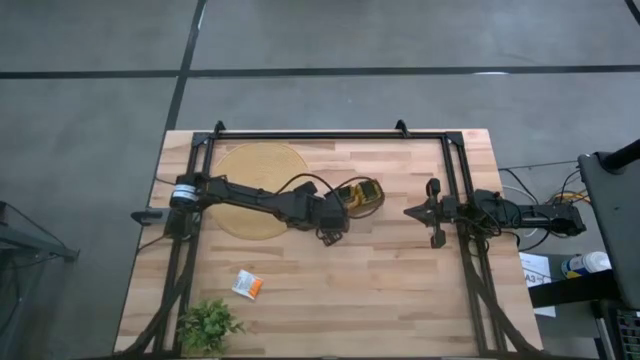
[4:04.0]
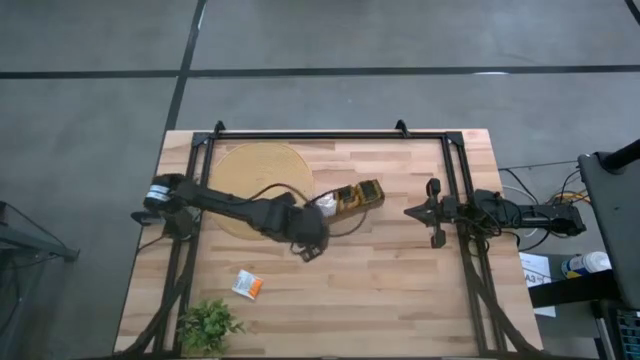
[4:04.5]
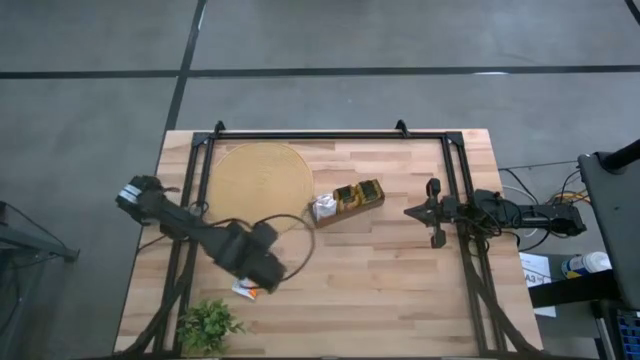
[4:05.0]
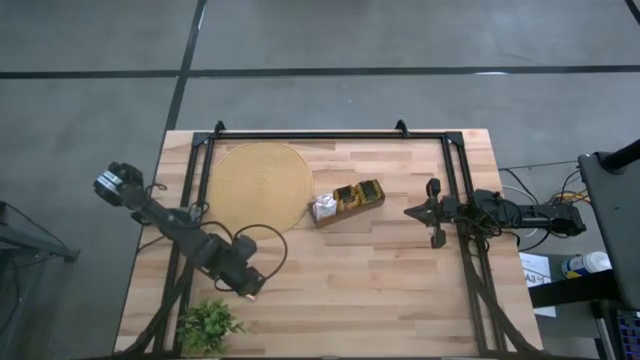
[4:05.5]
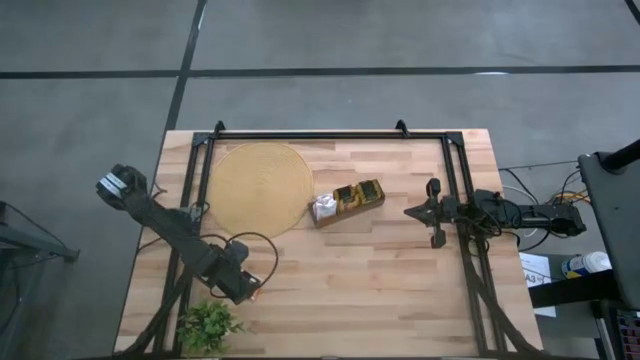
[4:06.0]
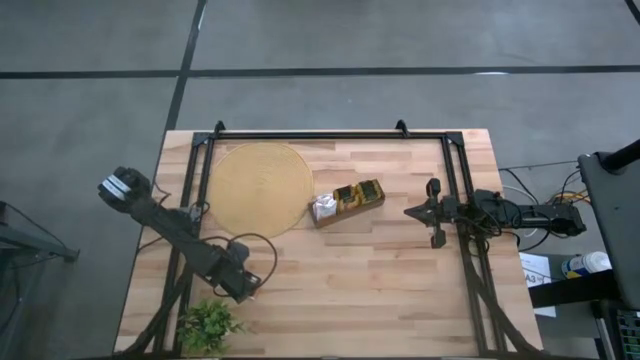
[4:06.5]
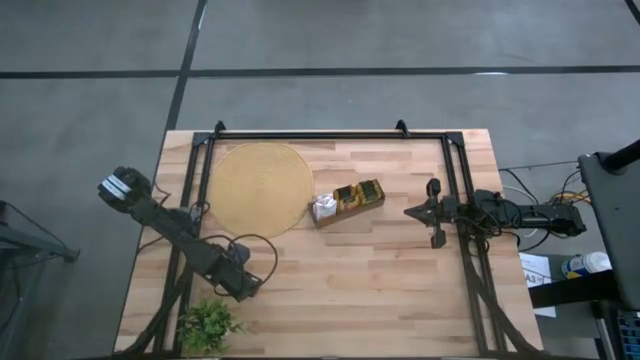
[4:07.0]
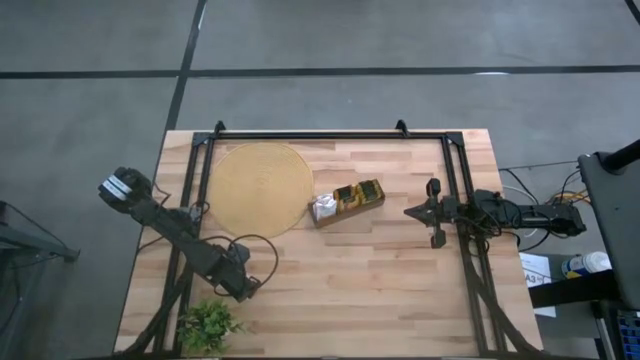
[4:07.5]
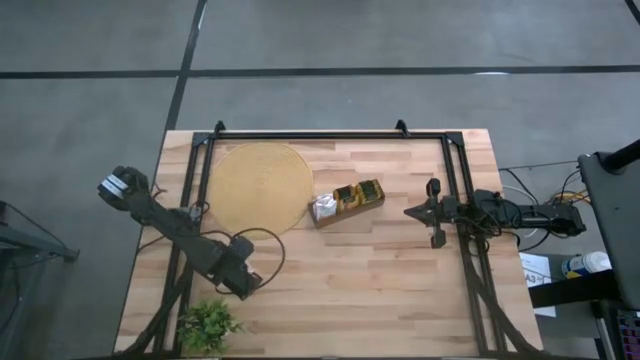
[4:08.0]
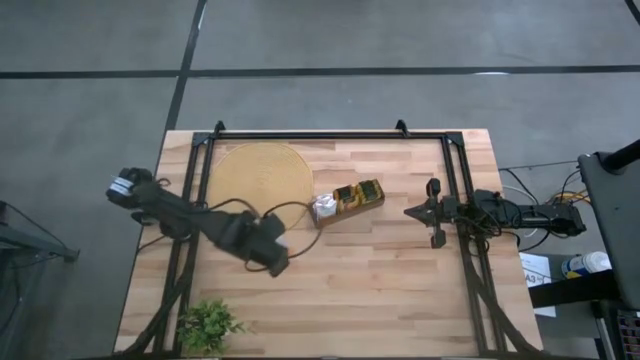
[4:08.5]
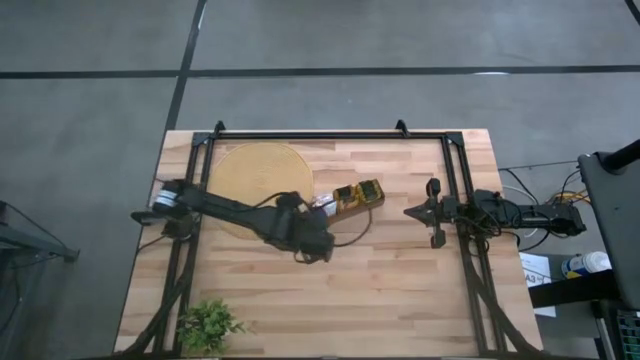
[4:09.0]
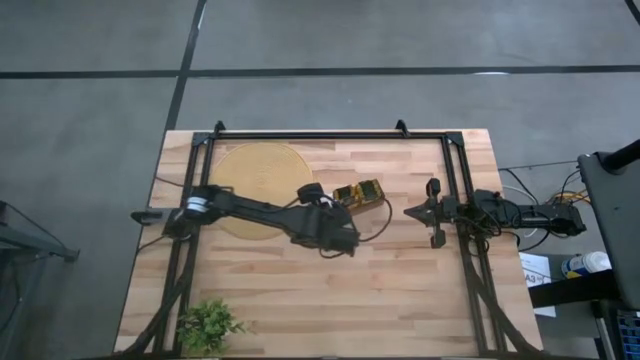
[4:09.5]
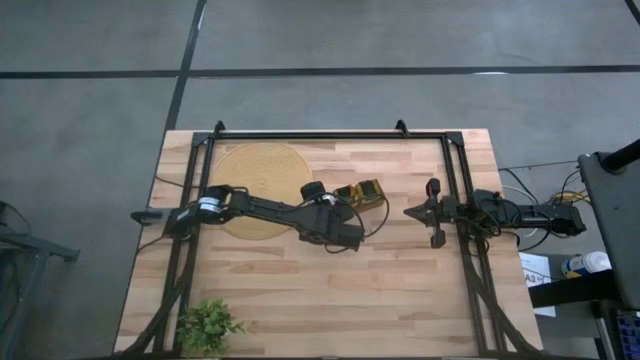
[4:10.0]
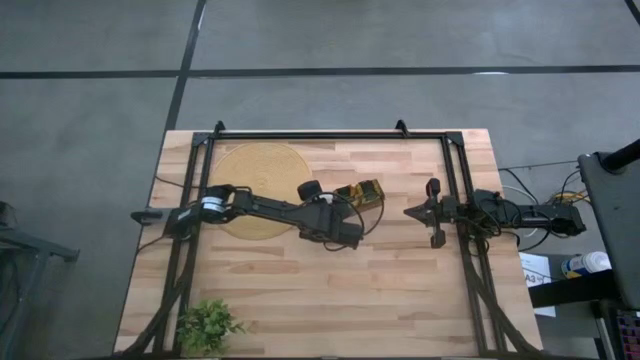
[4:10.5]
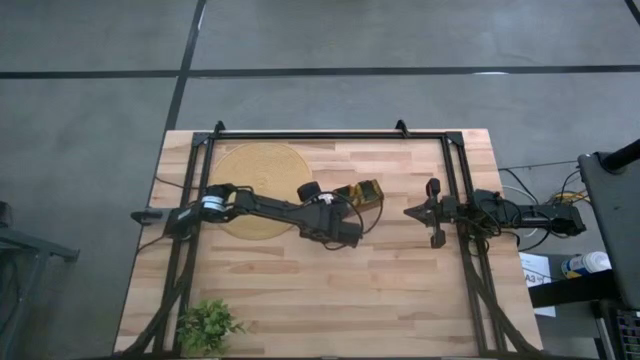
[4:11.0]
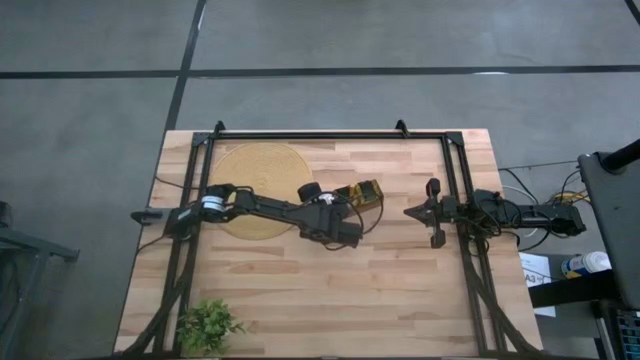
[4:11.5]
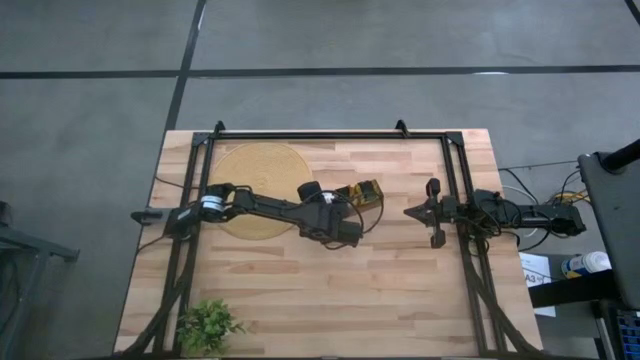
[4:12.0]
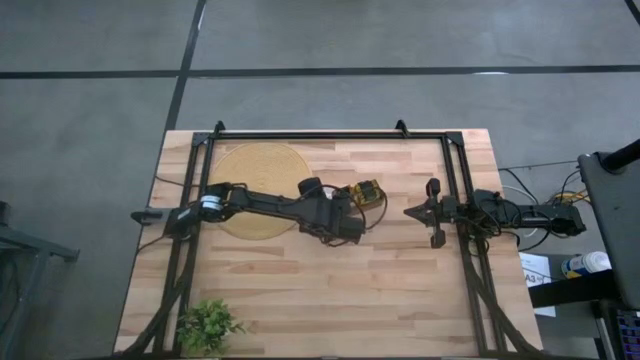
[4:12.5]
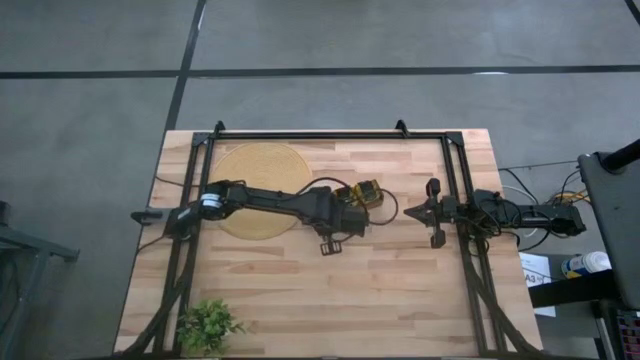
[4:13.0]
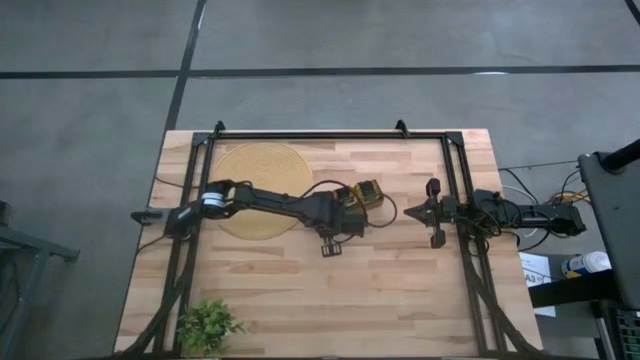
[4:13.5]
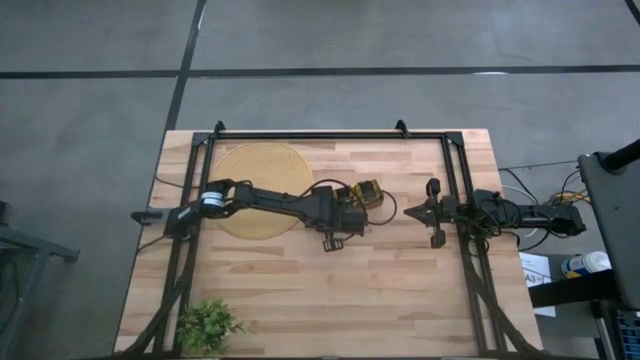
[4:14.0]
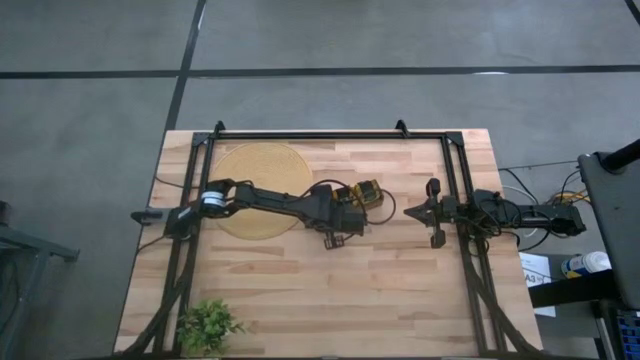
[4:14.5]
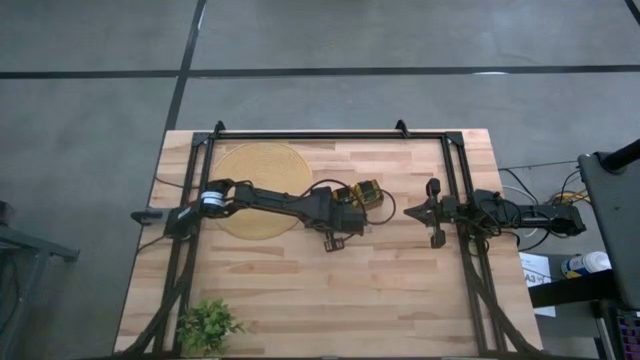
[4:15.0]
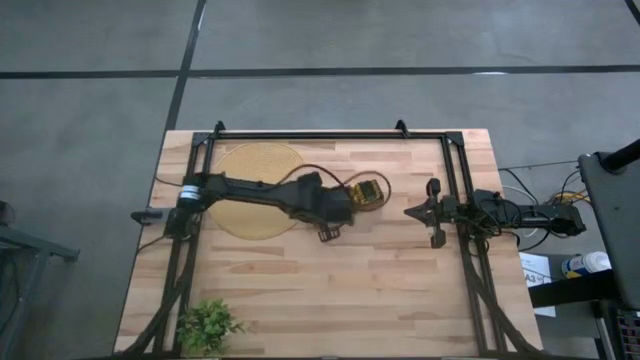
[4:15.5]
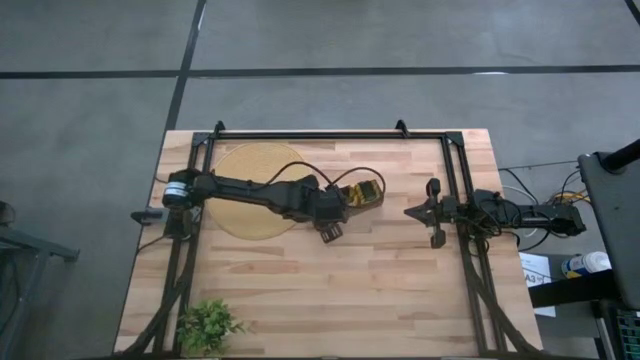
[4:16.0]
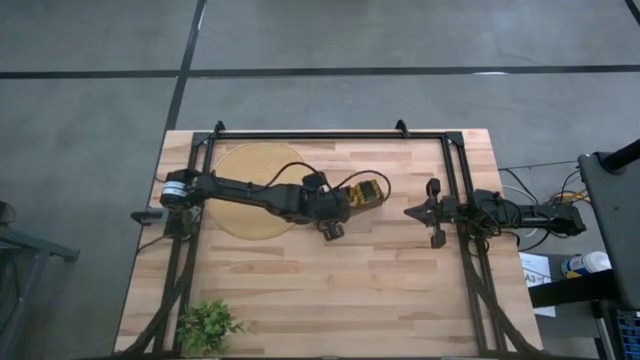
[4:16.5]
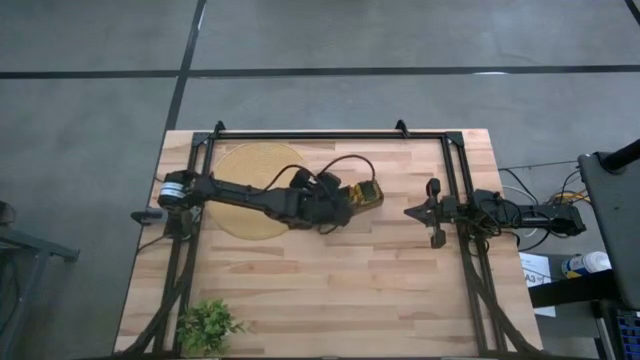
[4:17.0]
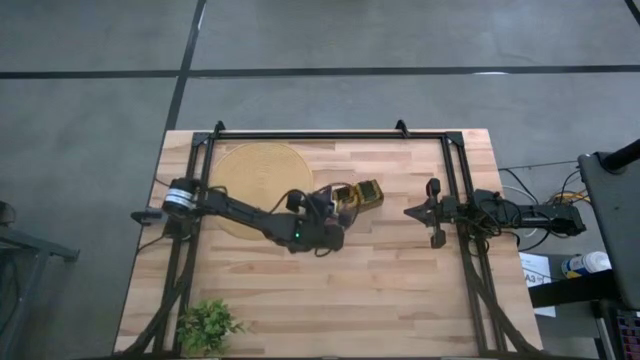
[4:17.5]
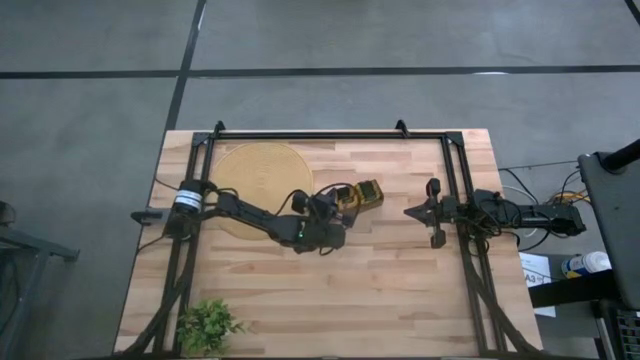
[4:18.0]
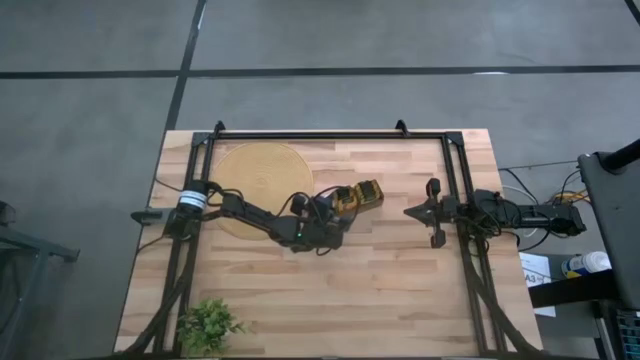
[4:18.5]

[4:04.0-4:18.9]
Task: Pick & Place Tea
Put the white tea bag into the left section of the wooden organizer
